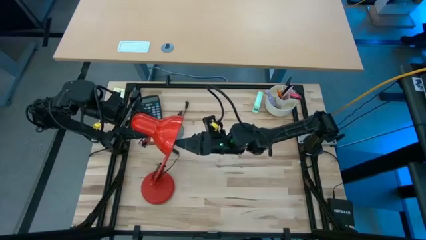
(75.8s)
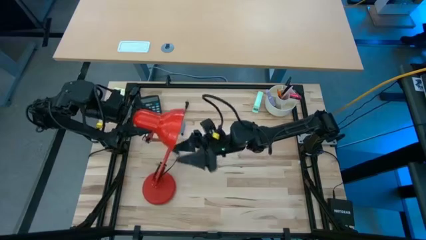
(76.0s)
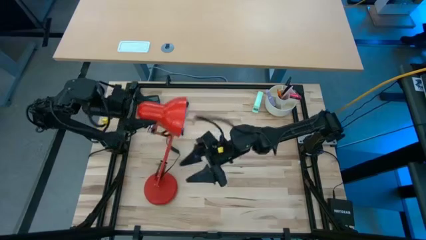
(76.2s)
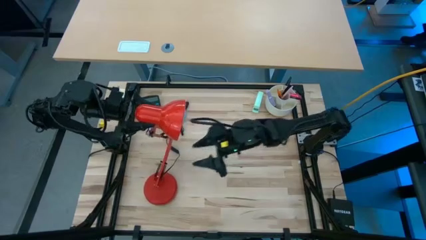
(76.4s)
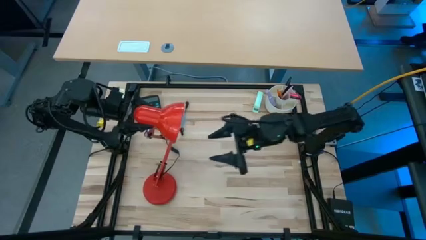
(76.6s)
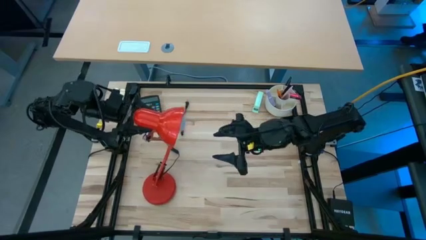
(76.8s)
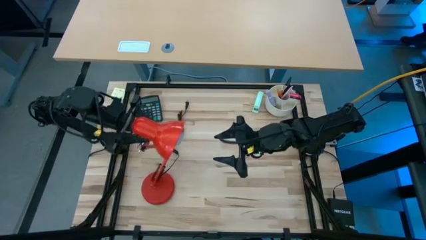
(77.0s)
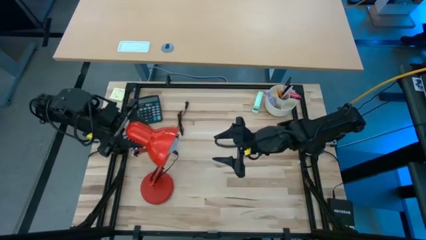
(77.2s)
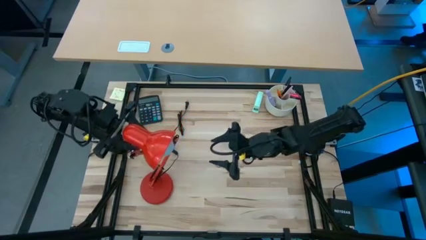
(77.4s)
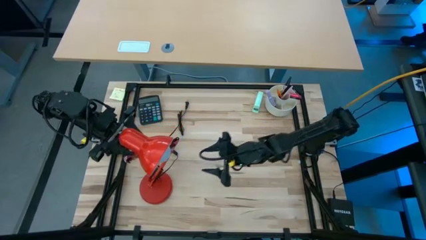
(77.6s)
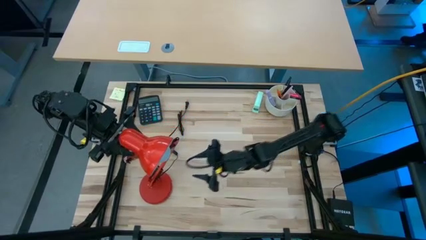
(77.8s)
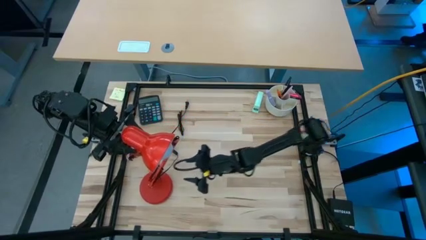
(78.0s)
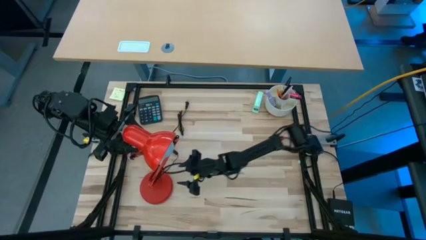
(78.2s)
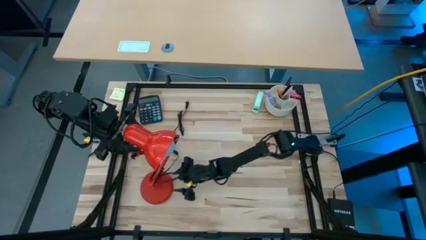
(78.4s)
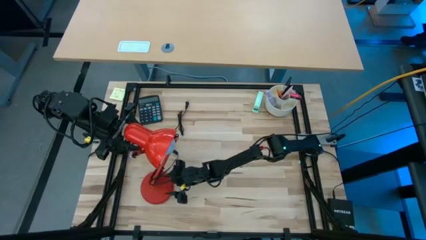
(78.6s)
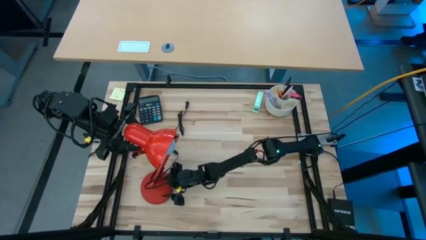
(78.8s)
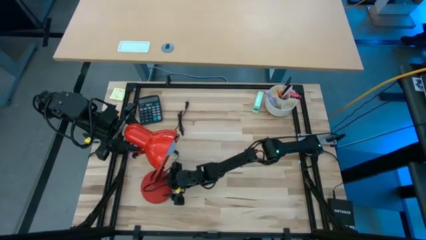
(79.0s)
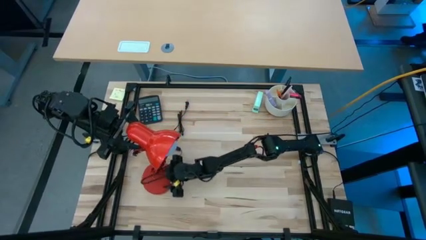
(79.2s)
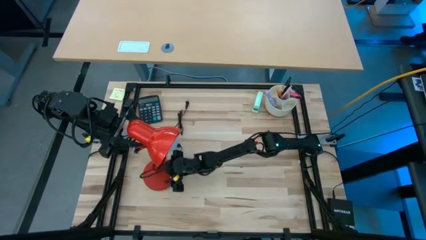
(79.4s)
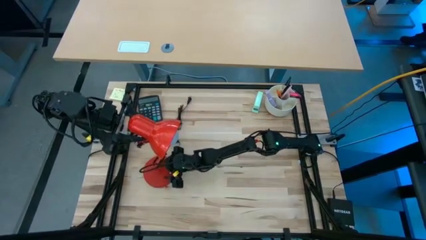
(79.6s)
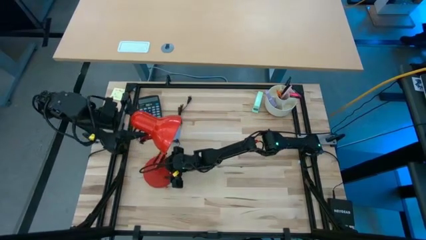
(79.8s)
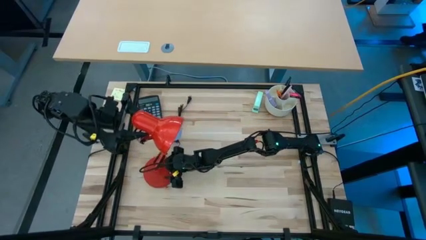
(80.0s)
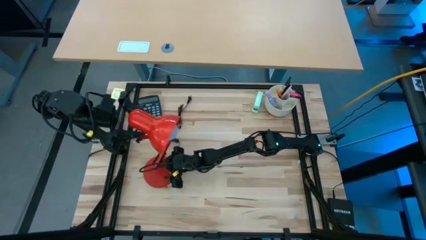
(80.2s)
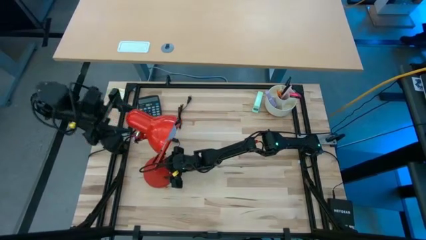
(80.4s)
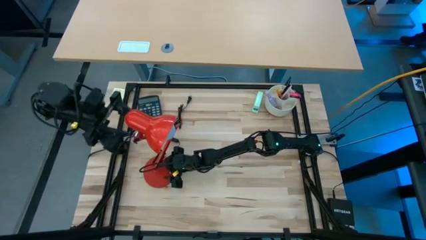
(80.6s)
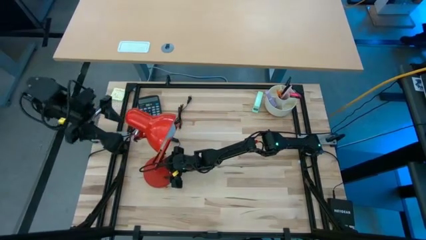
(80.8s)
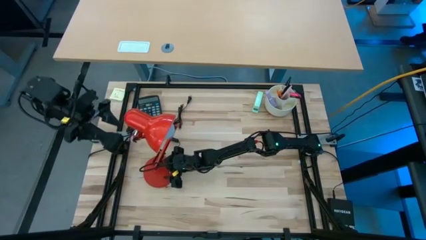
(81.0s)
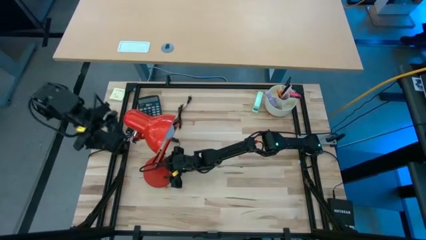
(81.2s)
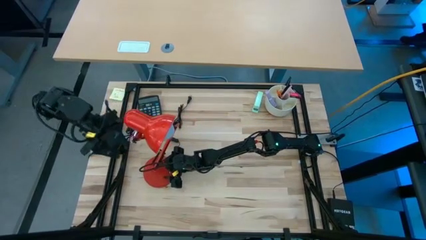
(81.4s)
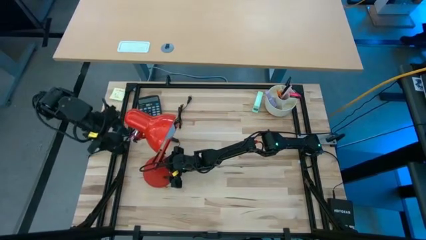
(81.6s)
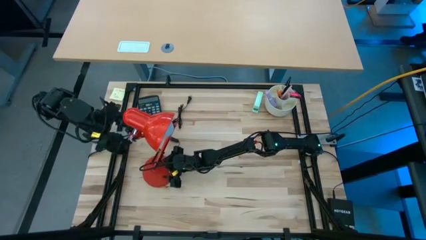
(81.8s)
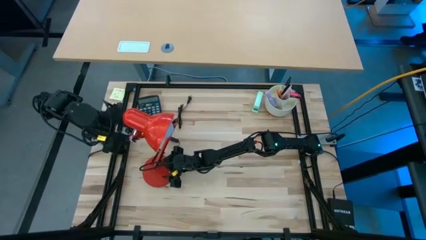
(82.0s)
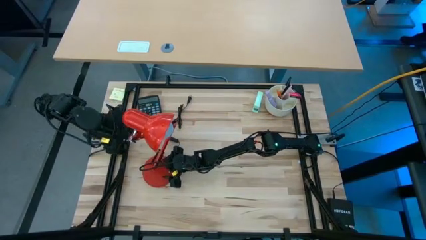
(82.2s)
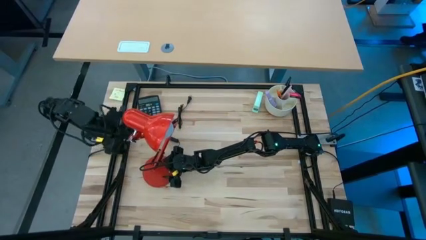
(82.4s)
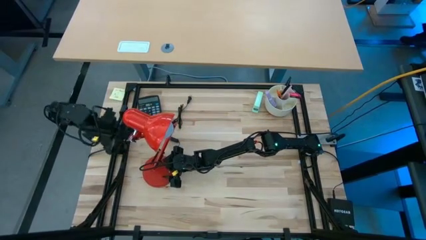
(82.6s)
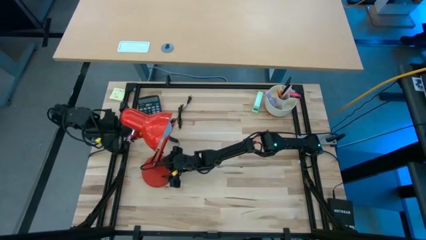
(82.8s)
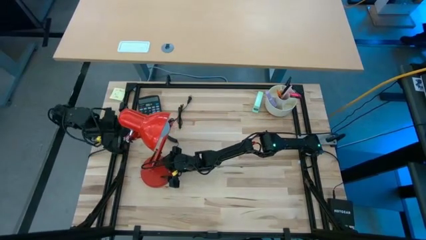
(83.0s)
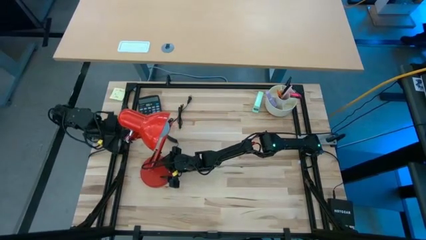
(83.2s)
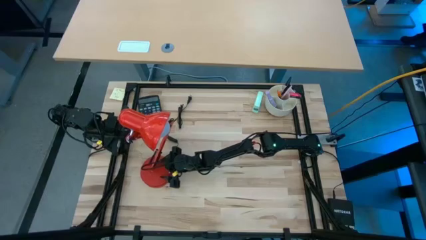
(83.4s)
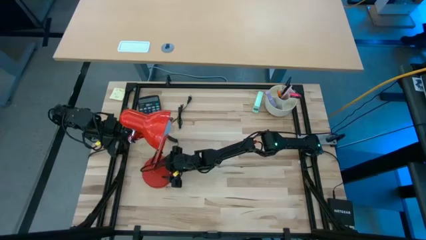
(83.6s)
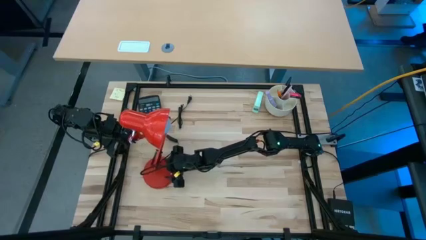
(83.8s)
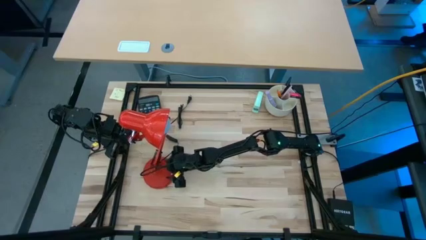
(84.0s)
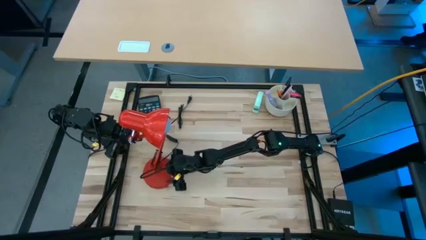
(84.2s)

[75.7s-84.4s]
Task: Screw lightbulb
Adjust the red desk lamp

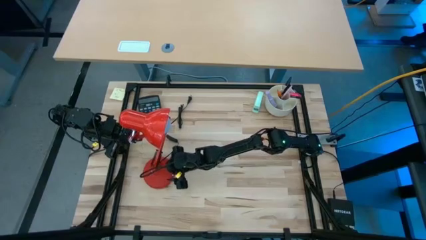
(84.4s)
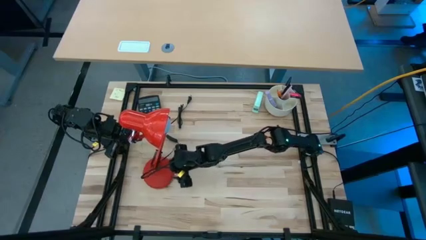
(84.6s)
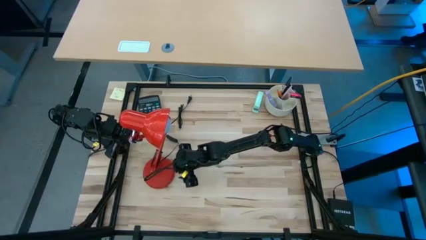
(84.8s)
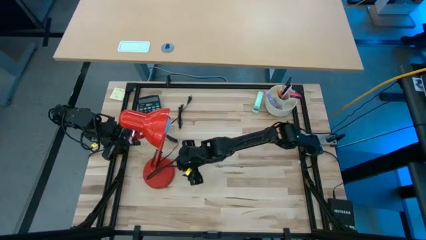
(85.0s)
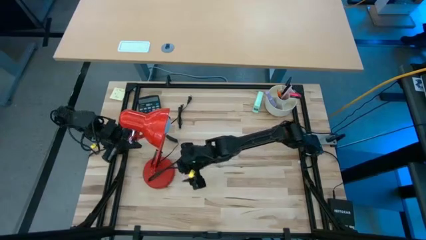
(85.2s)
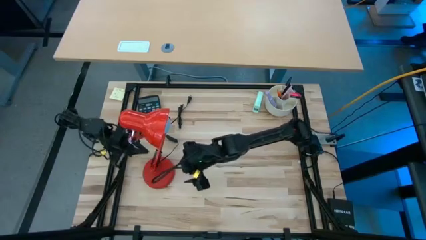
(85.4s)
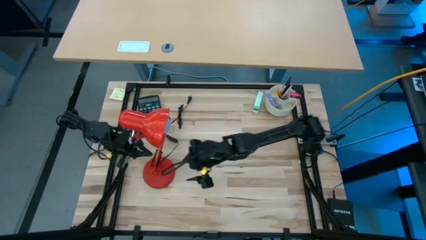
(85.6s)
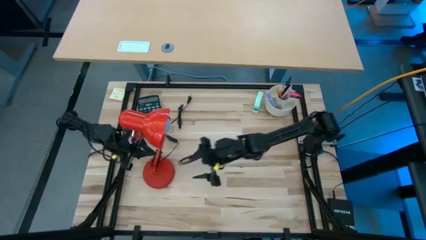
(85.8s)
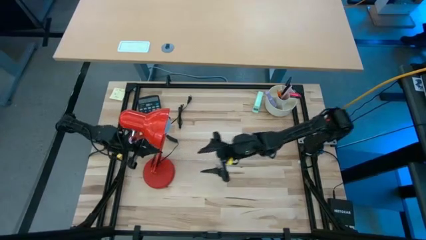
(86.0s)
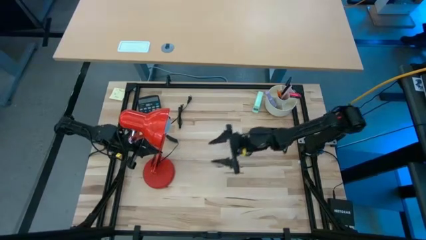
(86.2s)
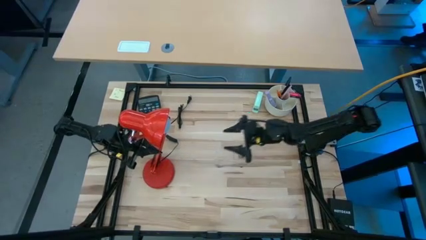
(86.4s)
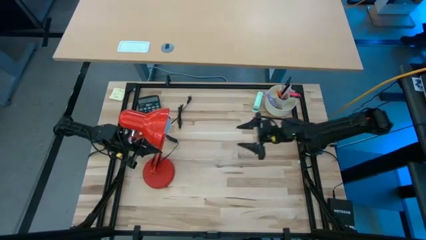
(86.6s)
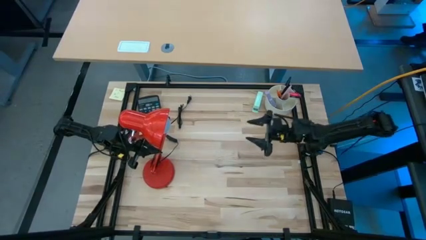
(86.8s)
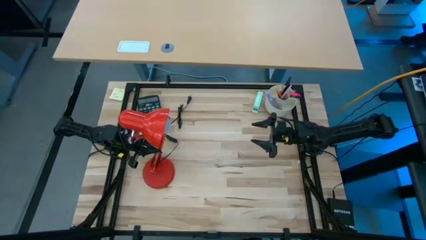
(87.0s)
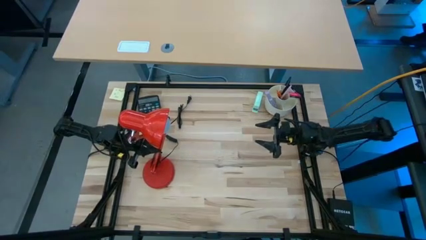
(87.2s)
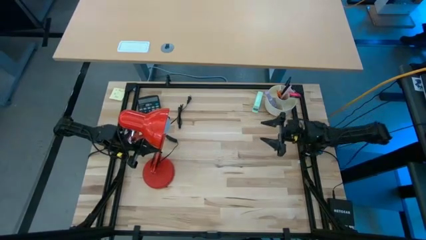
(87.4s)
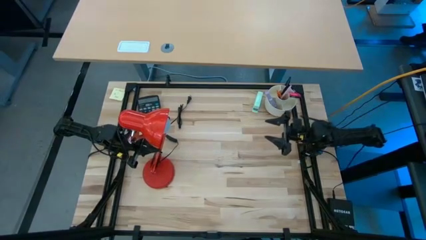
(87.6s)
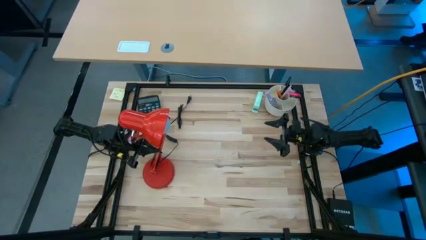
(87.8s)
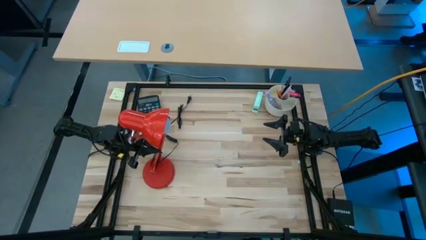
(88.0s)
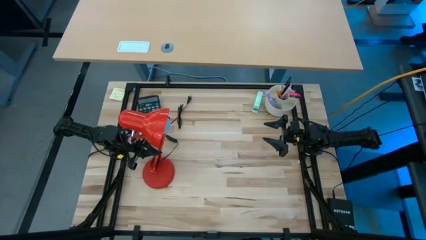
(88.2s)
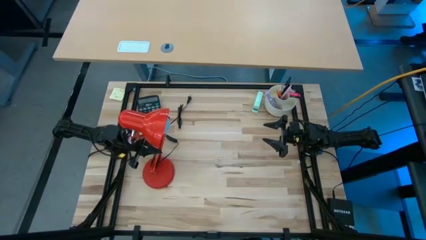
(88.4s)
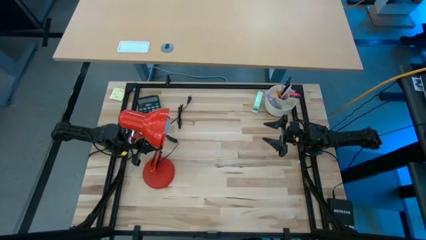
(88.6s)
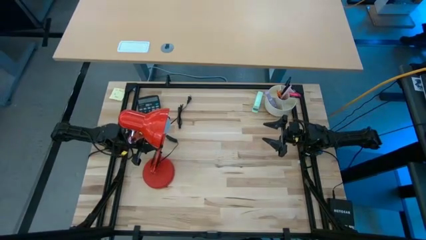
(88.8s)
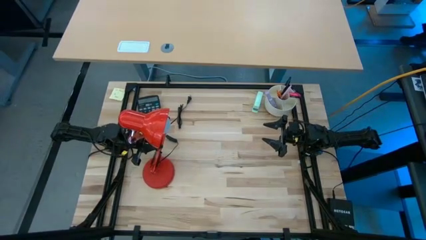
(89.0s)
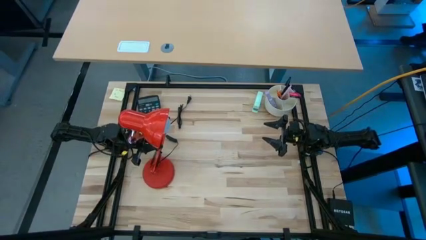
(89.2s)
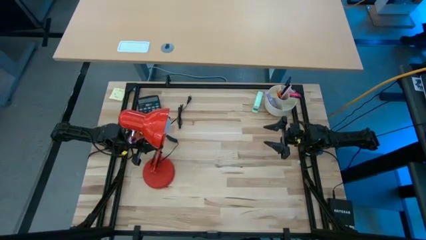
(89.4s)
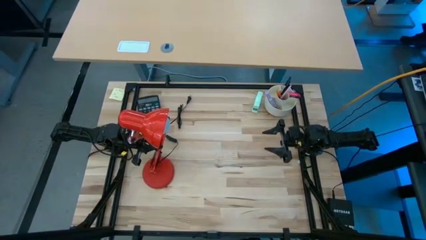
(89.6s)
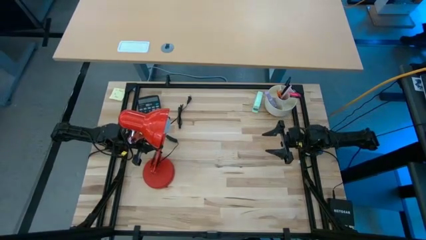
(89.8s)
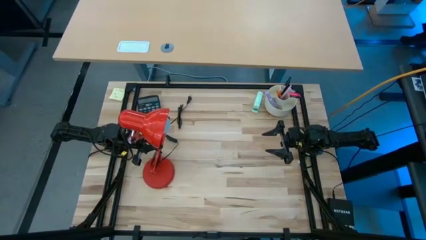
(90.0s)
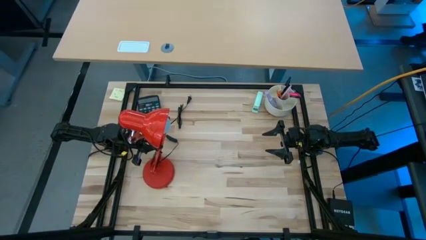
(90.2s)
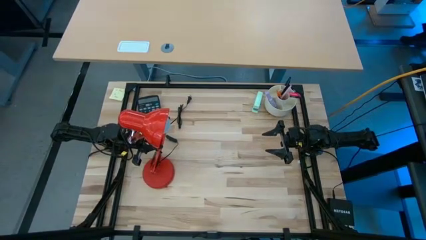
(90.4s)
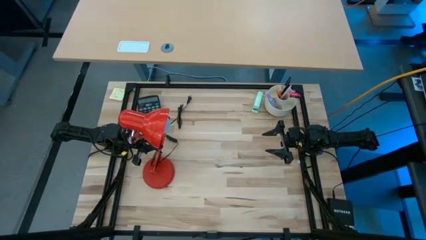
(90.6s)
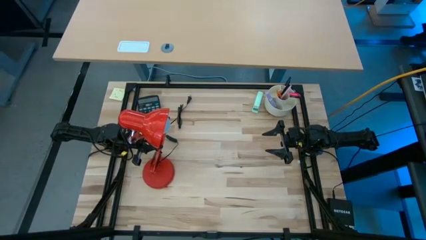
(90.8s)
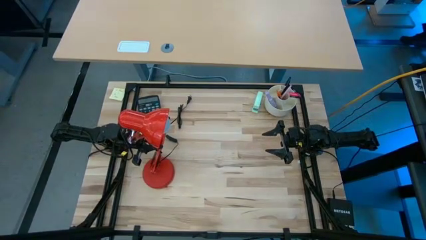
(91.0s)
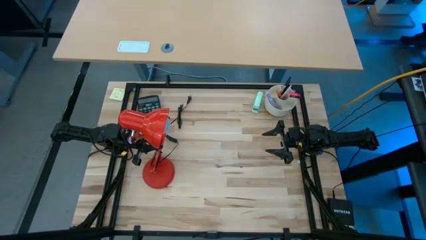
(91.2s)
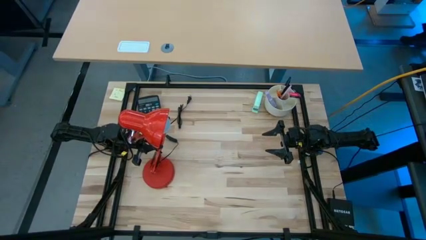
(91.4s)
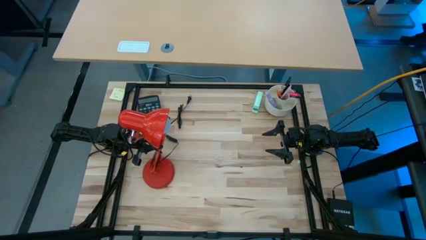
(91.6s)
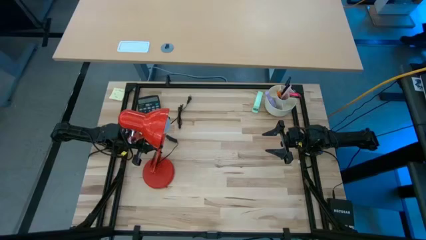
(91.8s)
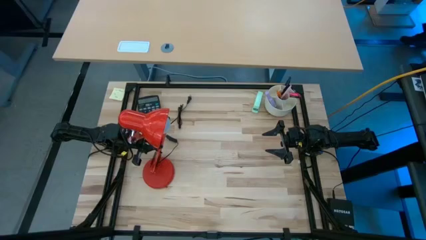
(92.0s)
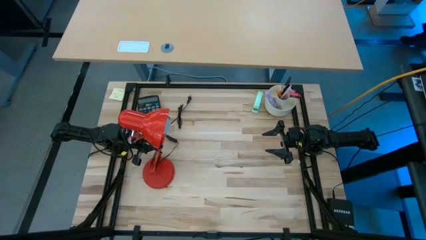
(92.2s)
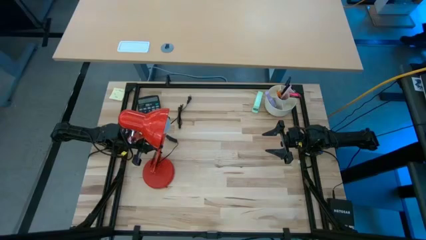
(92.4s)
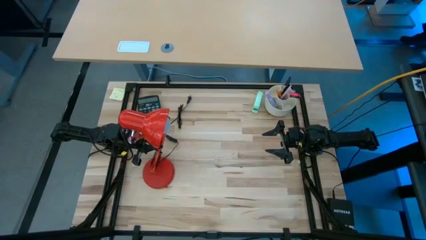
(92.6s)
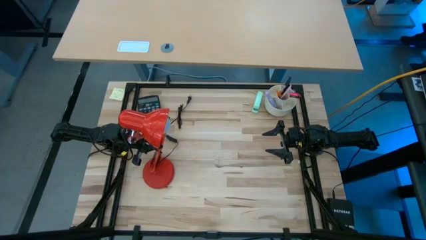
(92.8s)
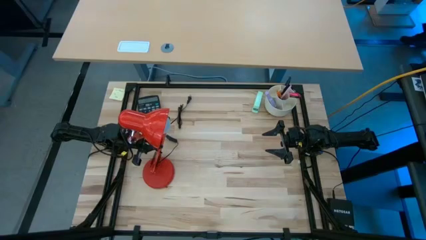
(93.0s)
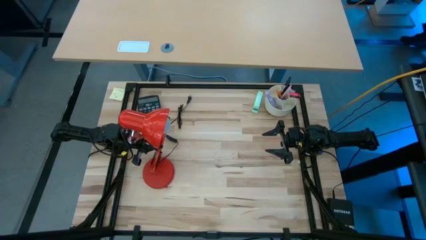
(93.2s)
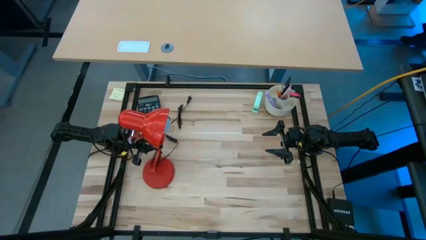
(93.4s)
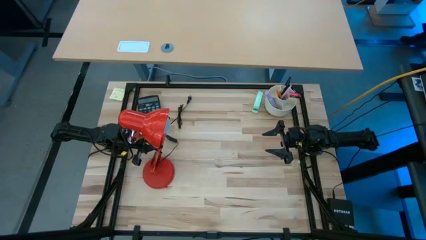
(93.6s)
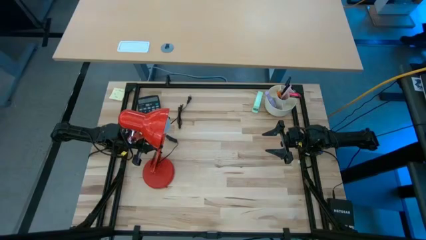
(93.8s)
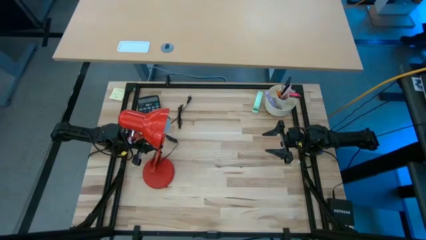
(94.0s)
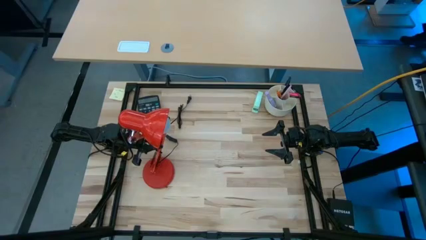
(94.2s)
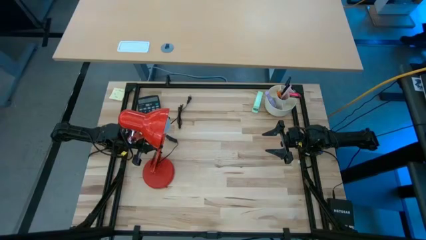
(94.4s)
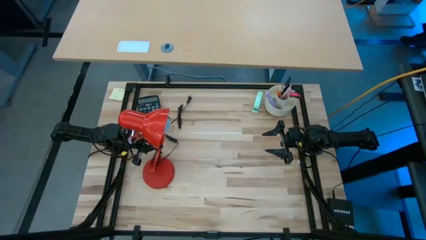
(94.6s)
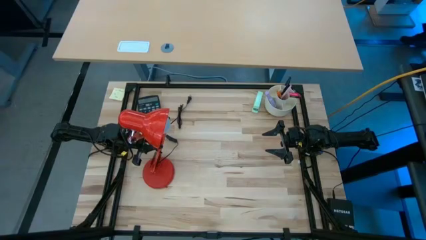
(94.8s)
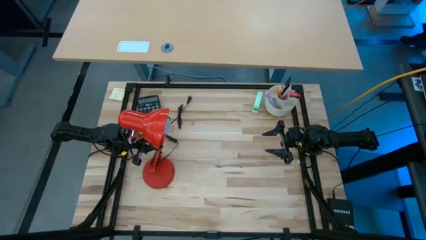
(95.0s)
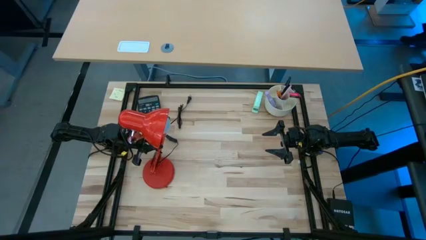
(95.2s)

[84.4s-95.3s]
Return to Home Position
